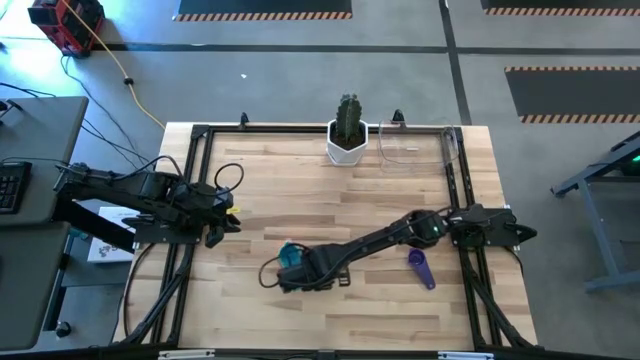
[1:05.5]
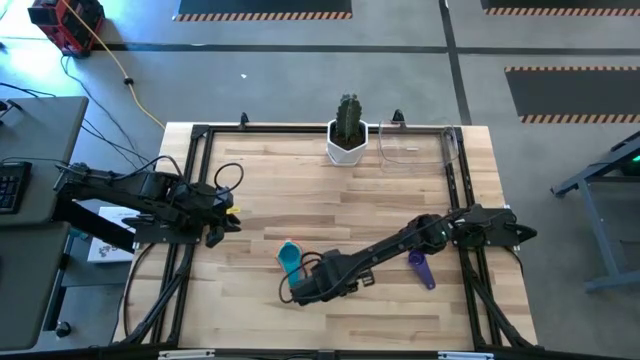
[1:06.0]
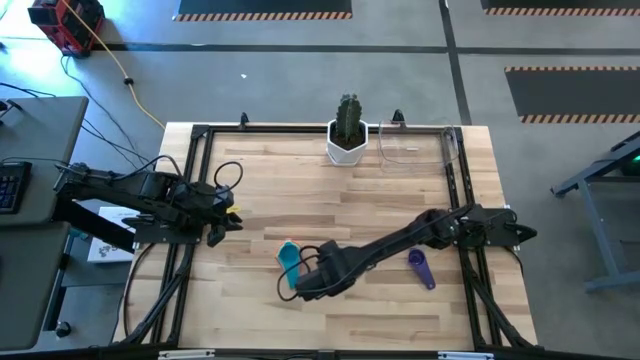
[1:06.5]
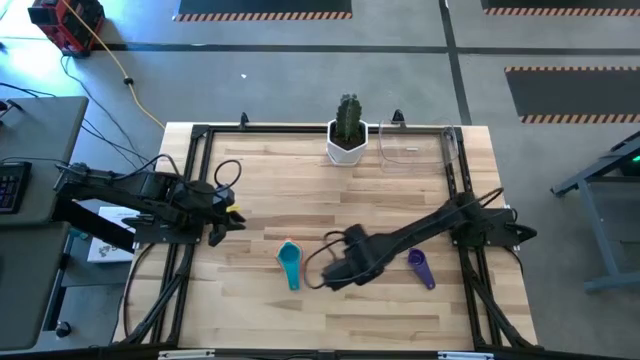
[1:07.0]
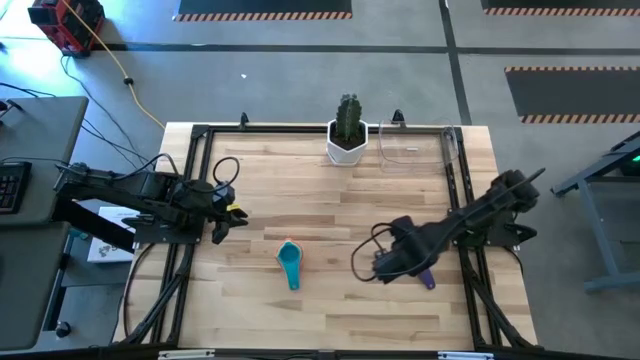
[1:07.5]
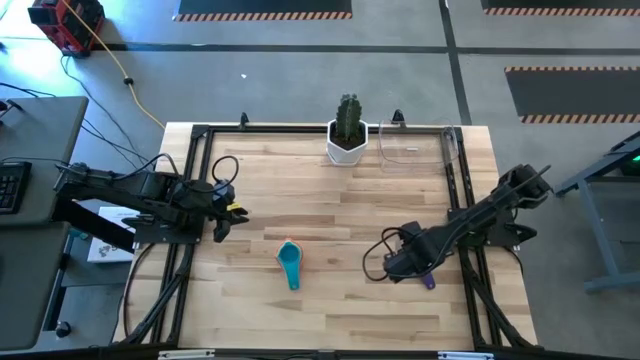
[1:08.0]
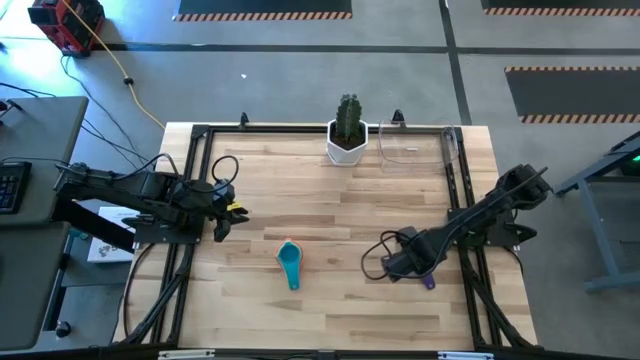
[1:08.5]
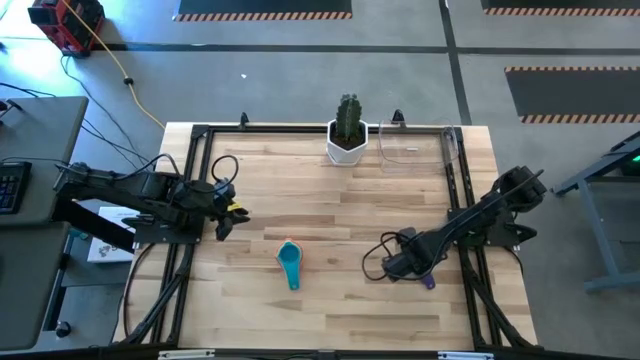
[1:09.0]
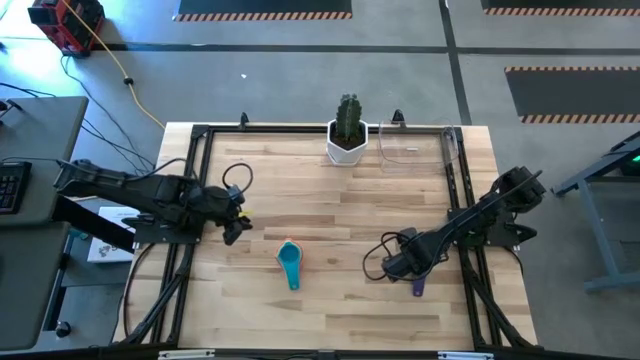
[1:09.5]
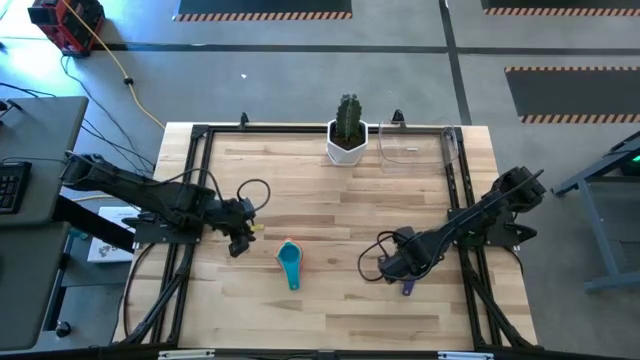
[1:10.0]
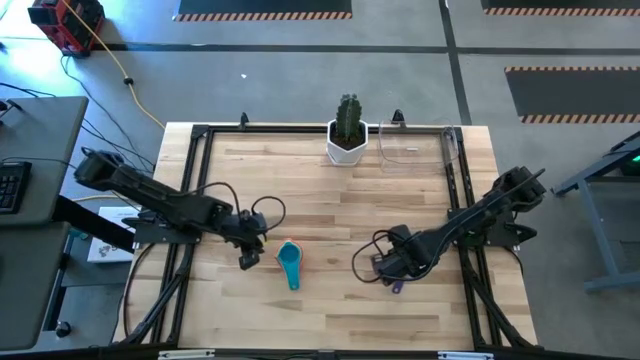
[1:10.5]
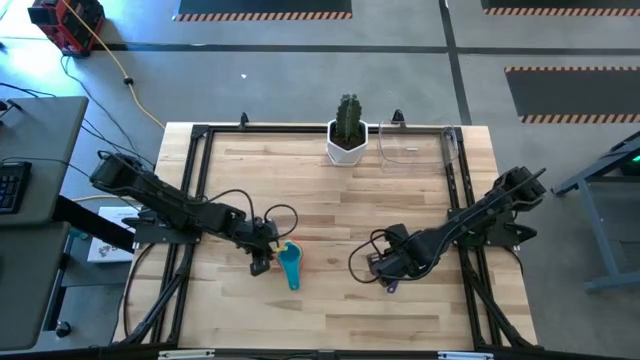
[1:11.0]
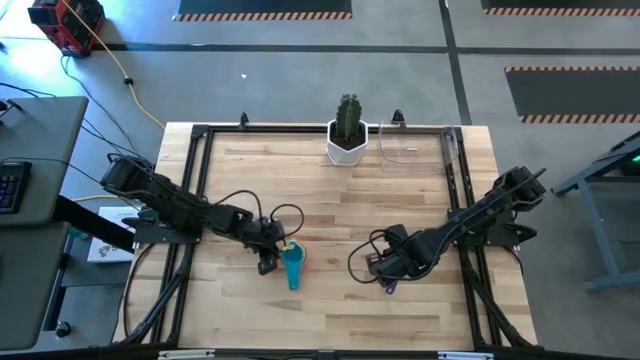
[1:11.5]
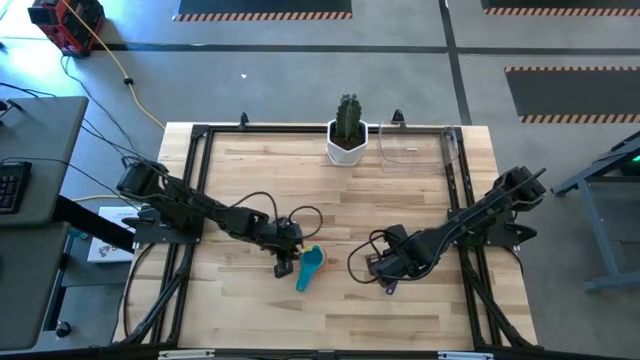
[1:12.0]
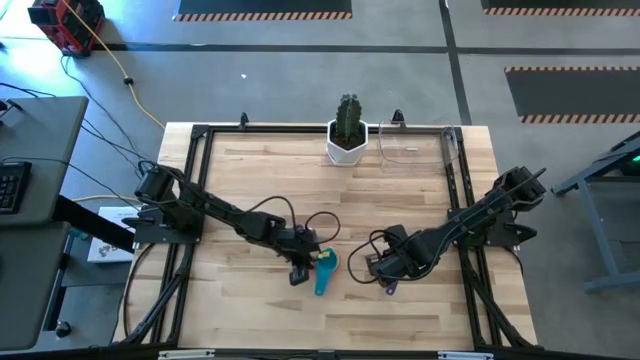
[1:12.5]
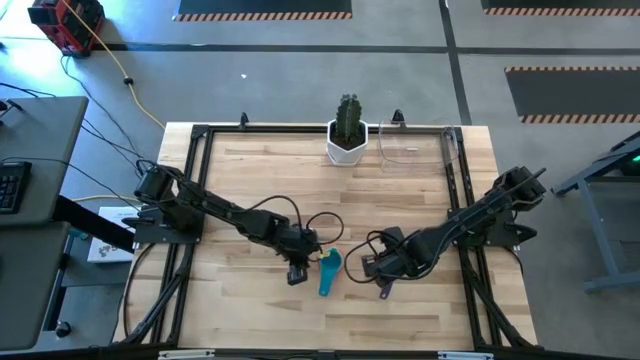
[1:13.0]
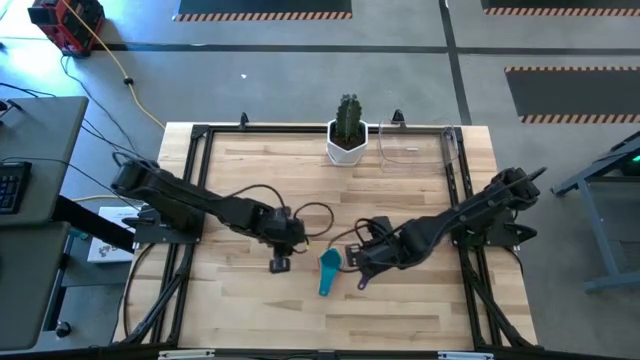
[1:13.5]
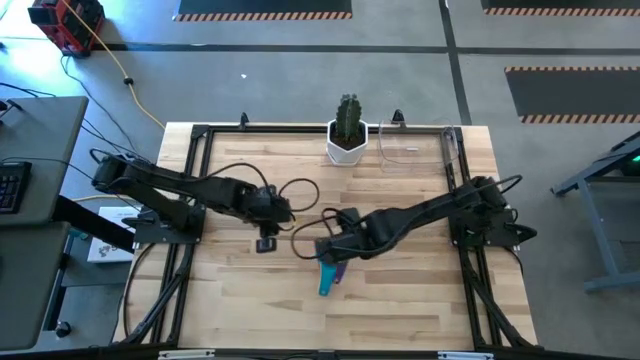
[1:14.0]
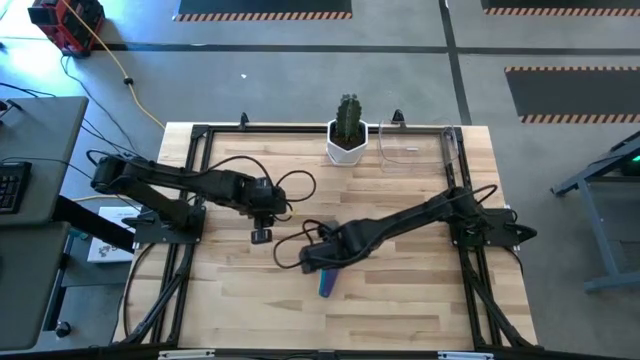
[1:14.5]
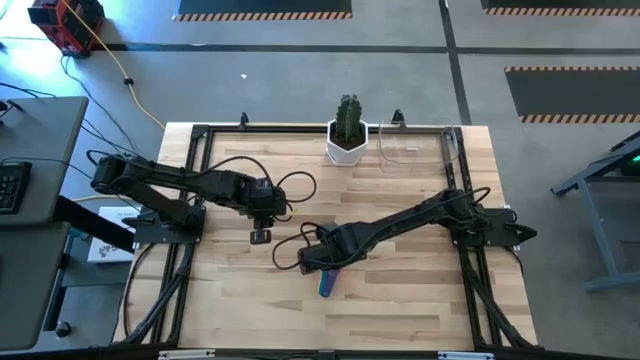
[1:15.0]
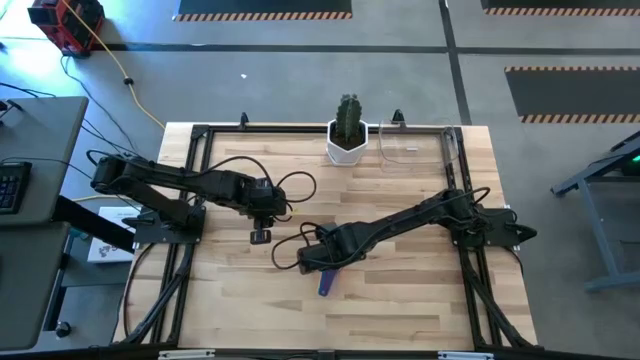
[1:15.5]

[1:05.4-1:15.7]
Task: Nest measuring cups in basket
Put the dark blue measuring cup on top of the light blue measuring cup

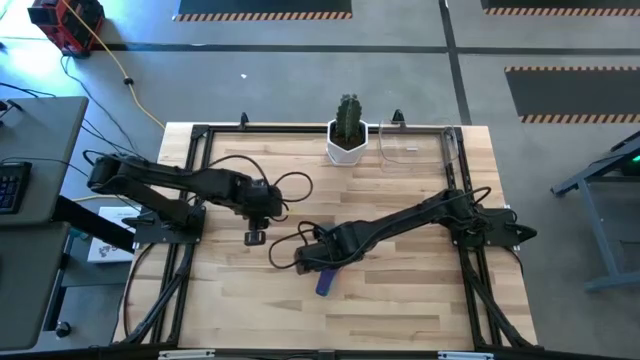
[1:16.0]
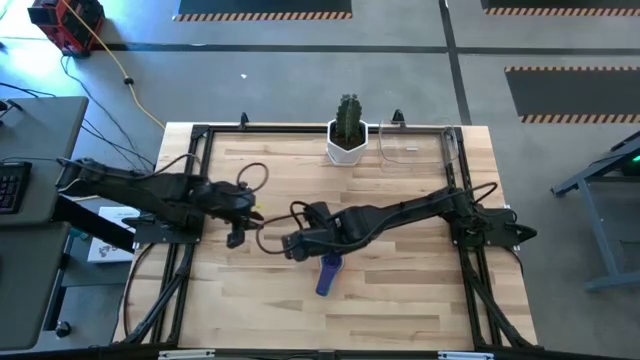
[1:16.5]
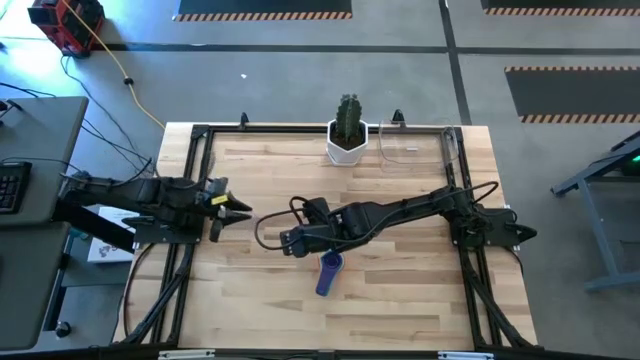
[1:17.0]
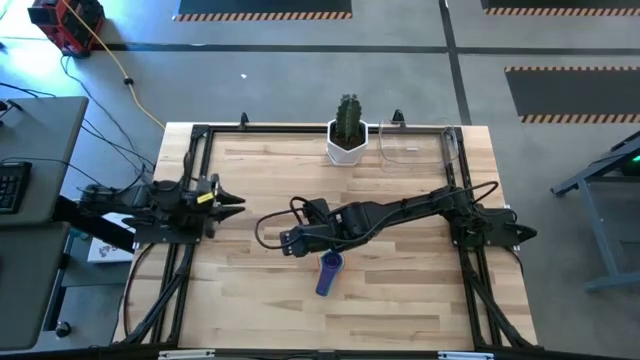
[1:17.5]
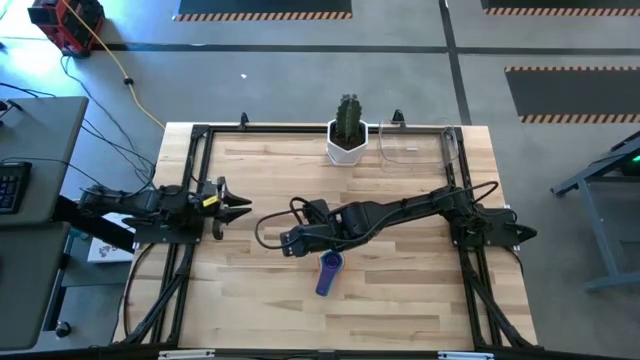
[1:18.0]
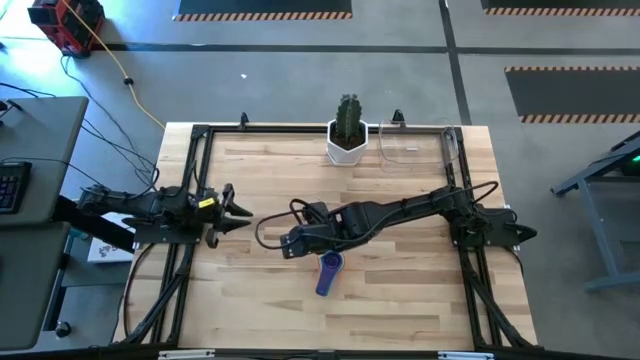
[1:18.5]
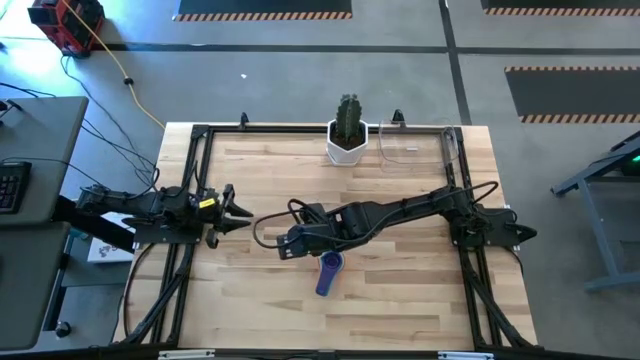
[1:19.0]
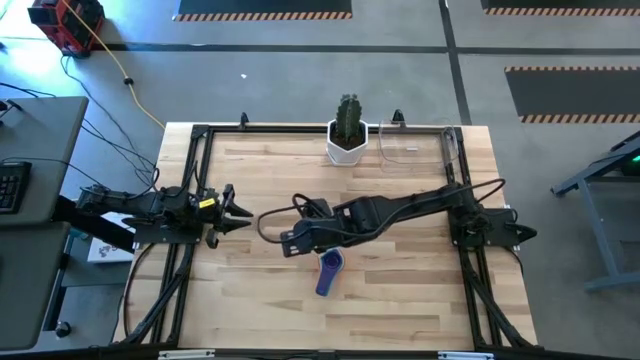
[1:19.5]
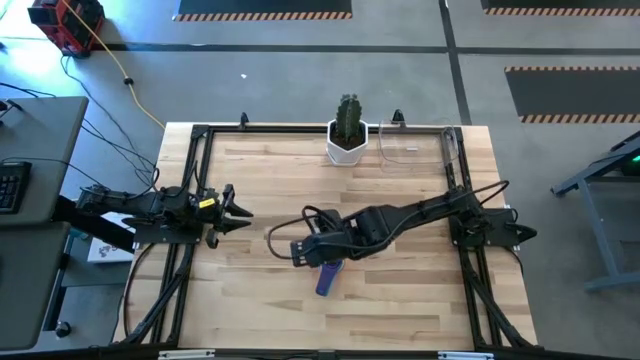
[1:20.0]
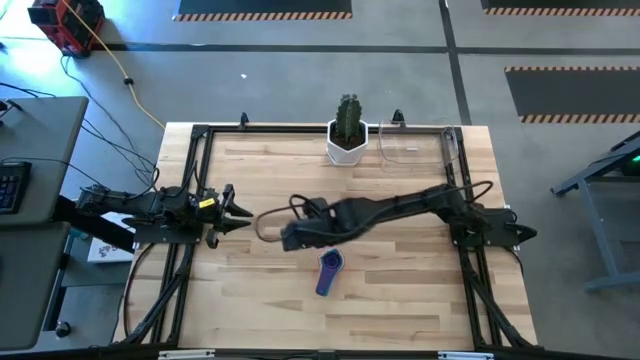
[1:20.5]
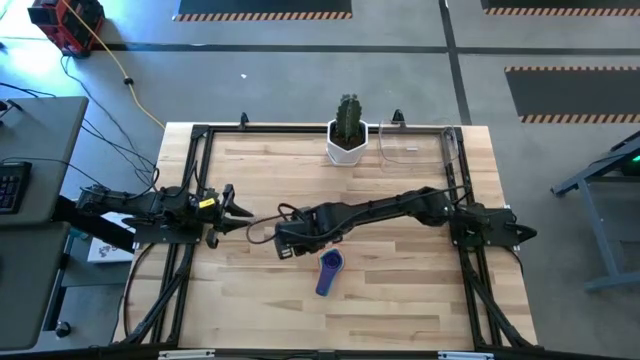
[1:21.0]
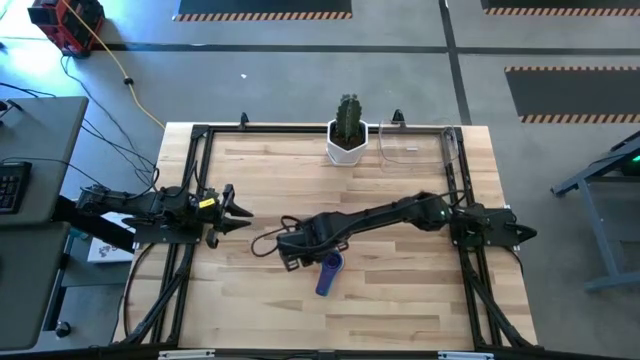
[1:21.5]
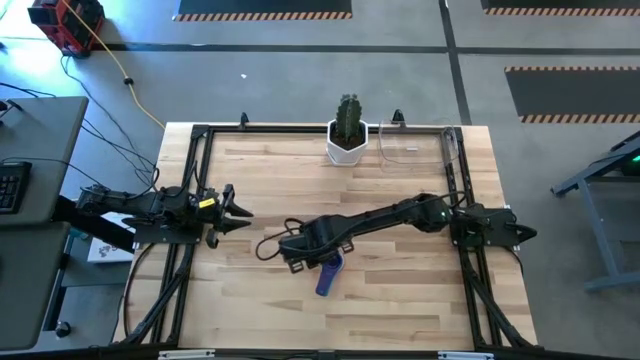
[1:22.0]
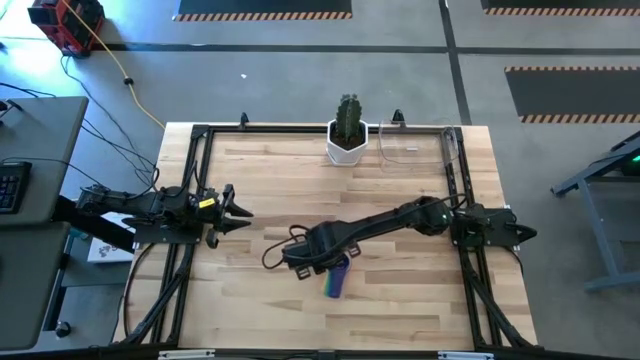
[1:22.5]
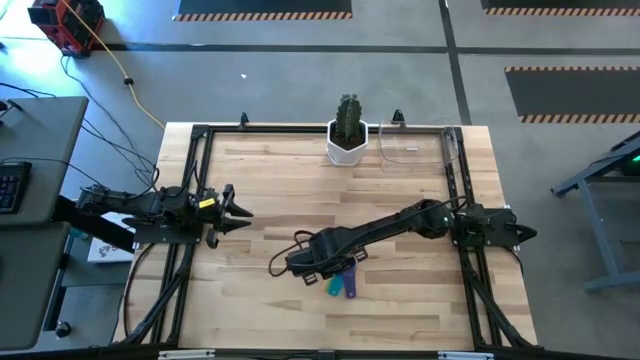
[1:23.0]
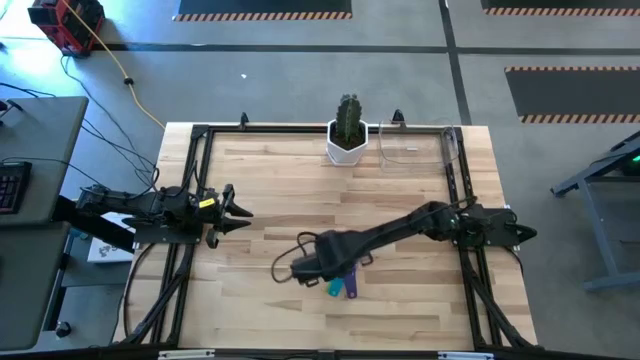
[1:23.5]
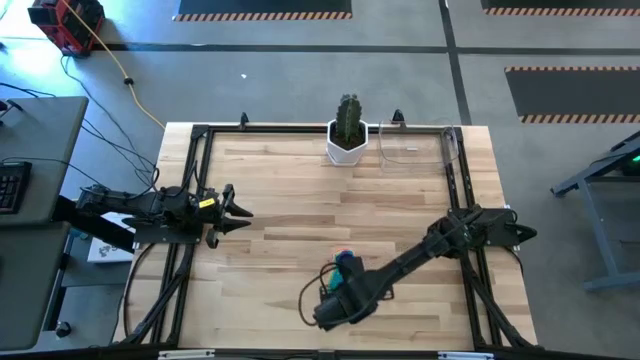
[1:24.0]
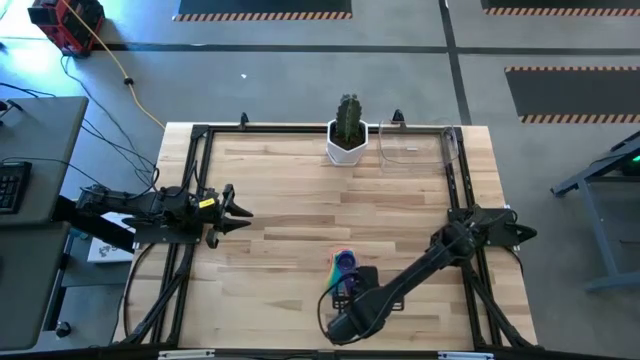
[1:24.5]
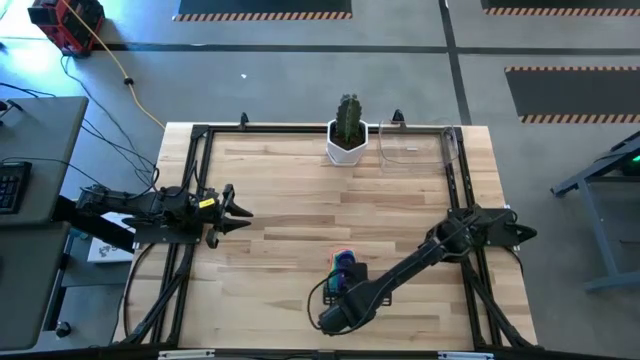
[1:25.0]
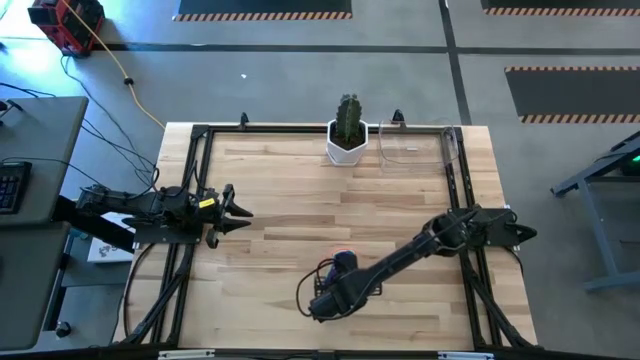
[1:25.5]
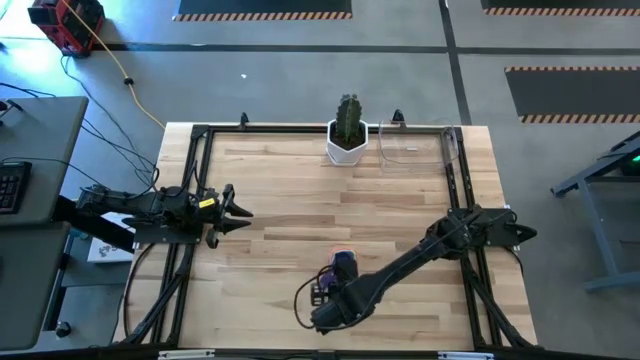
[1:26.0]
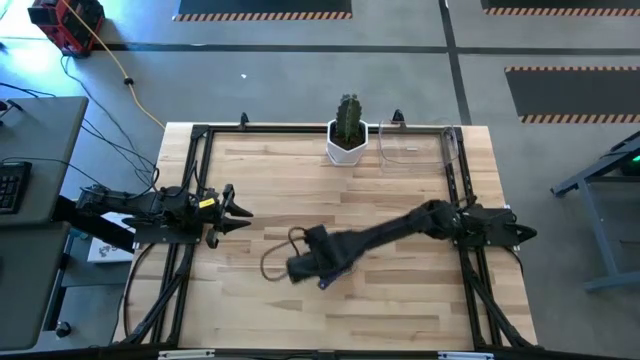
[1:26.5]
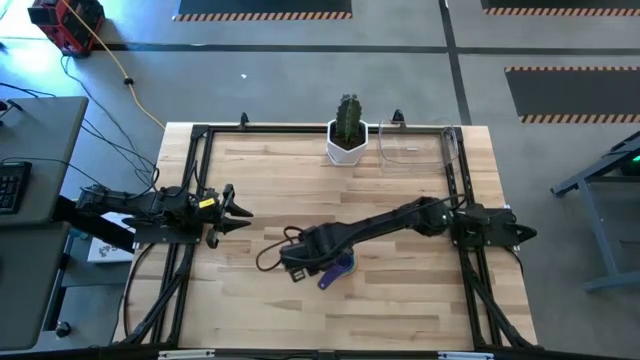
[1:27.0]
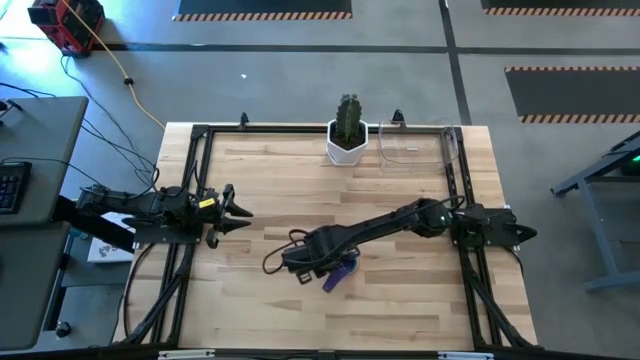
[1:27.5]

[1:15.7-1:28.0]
Put the measuring cups into the transparent bin
